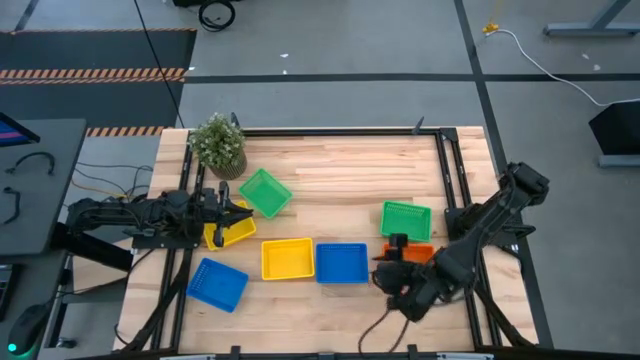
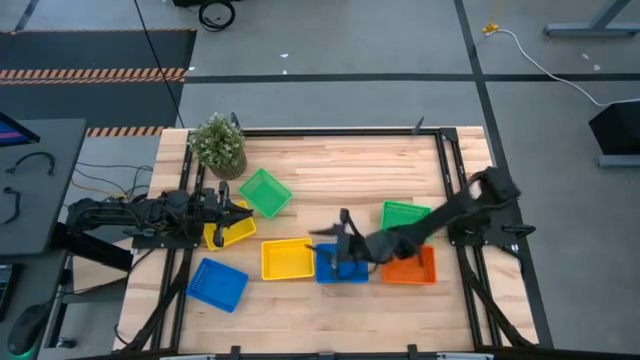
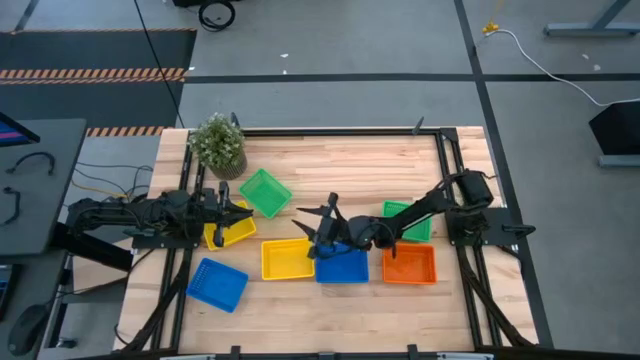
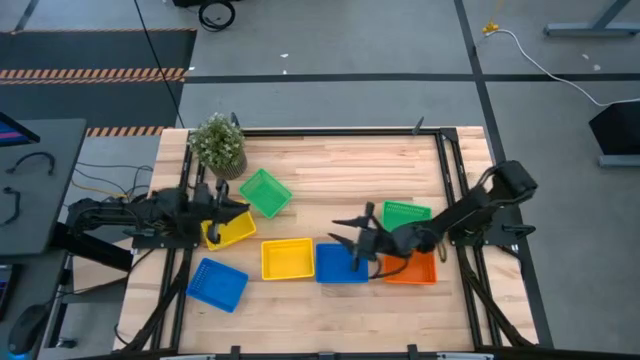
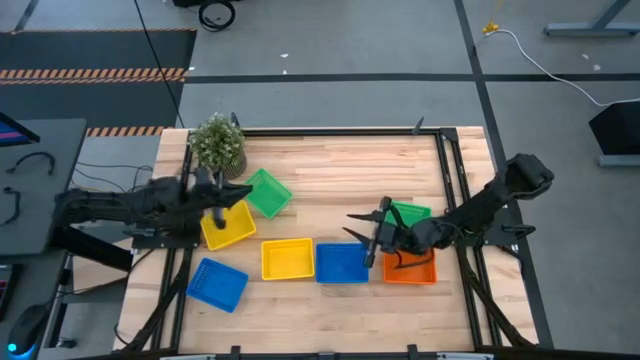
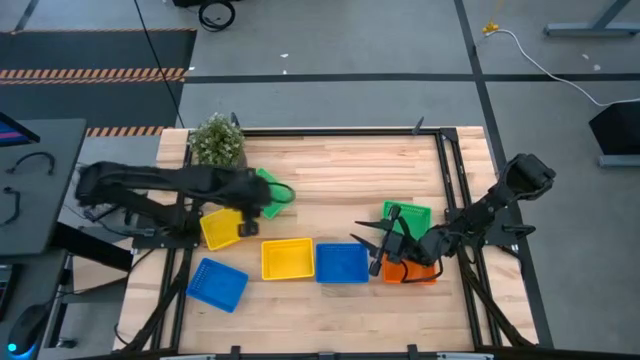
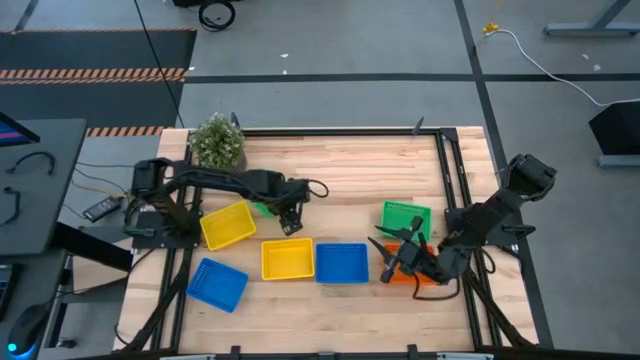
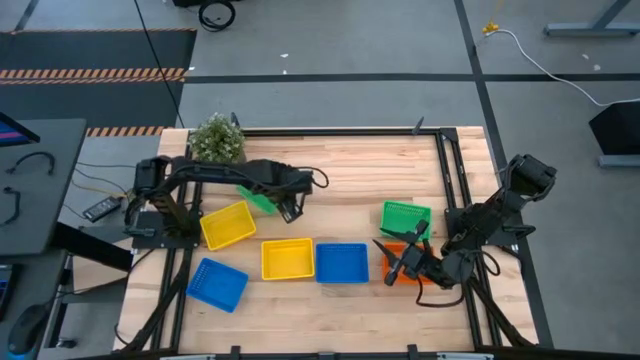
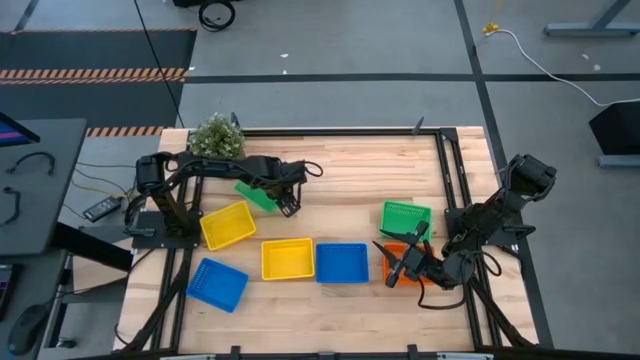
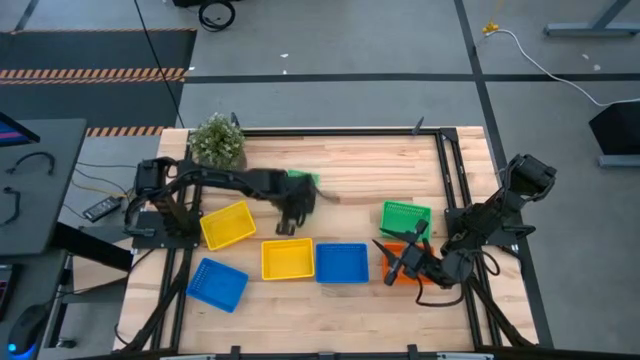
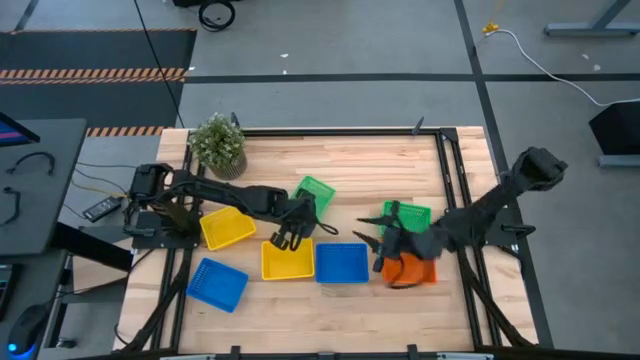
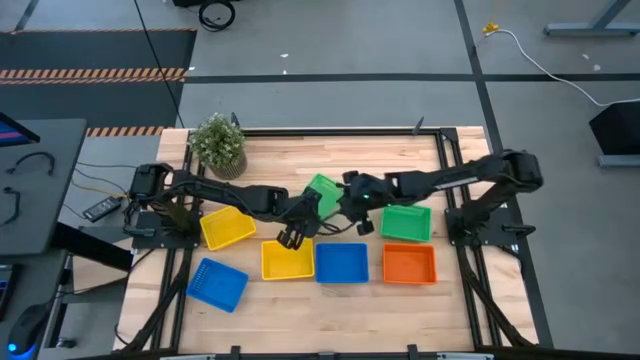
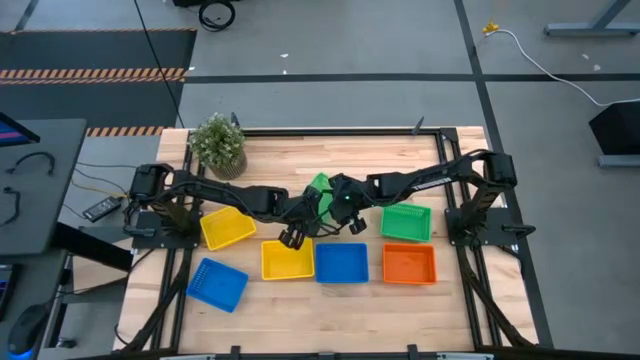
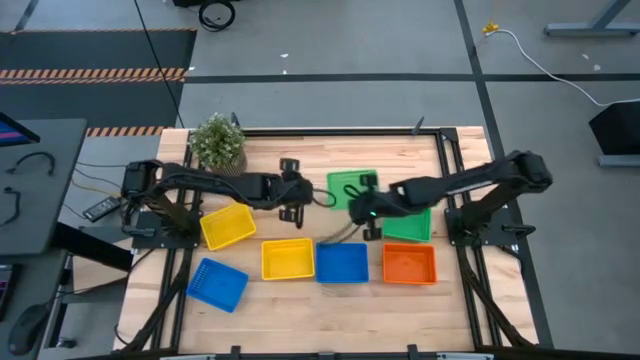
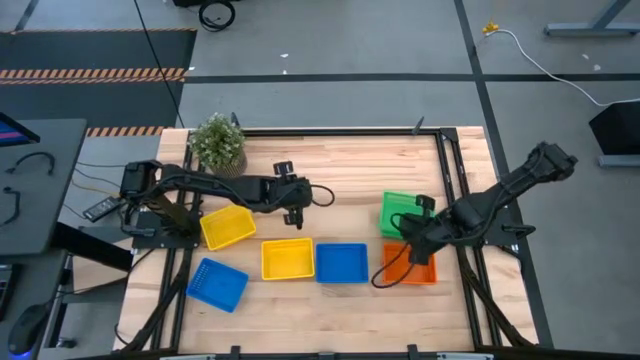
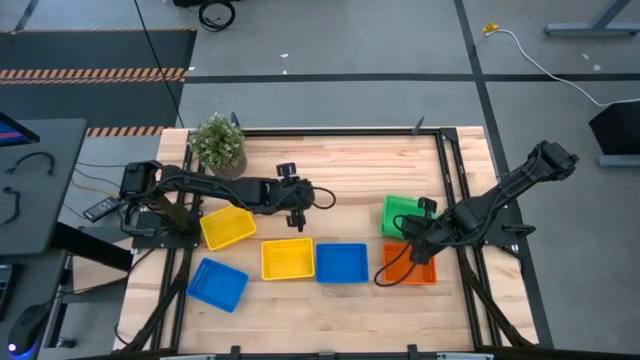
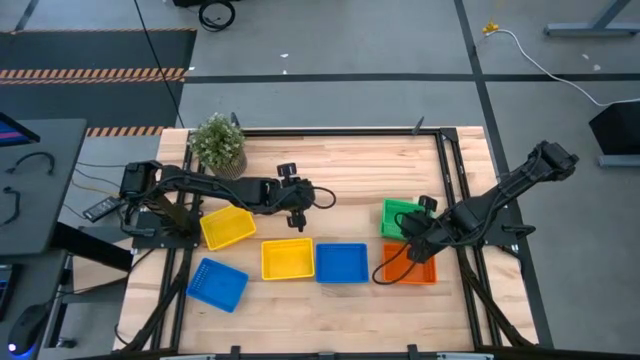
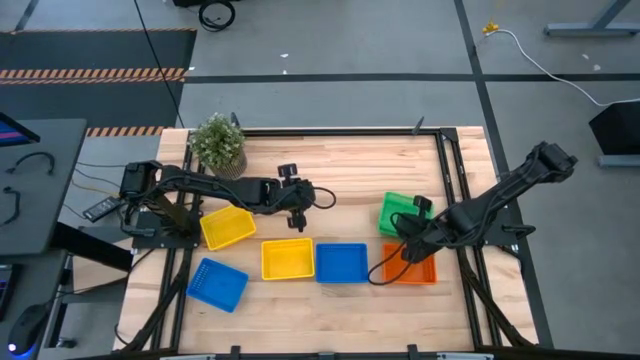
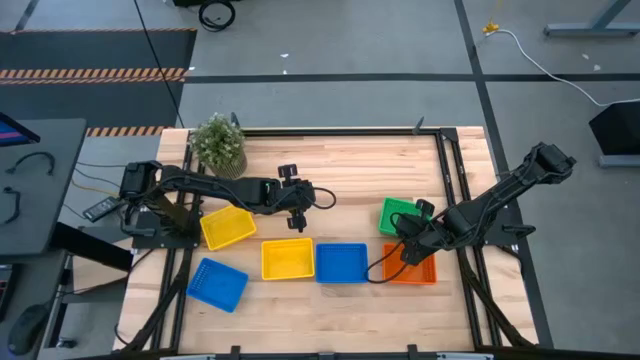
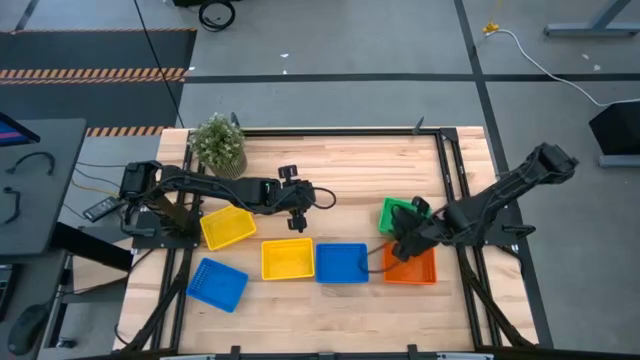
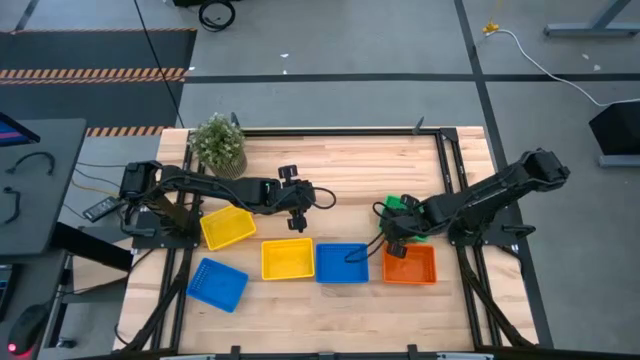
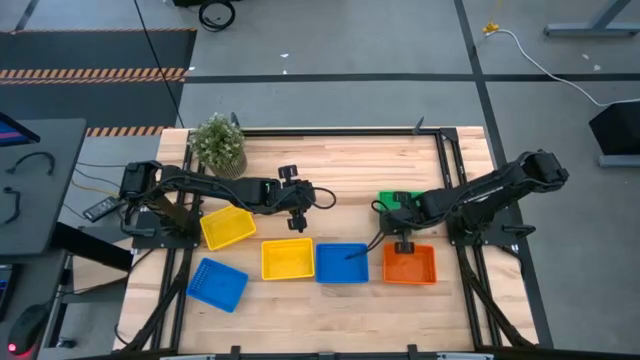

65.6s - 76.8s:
Stack the left green bin on top of the right green bins

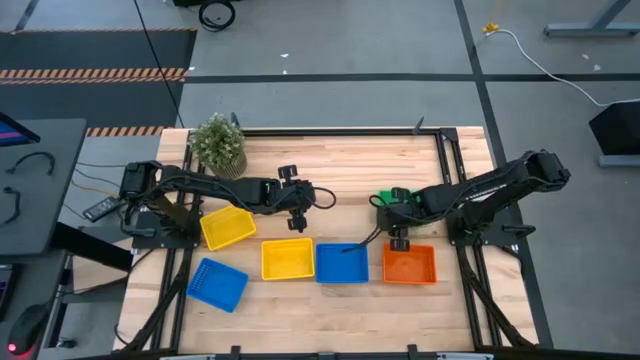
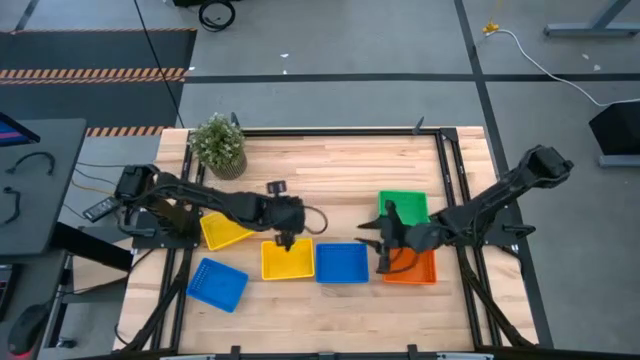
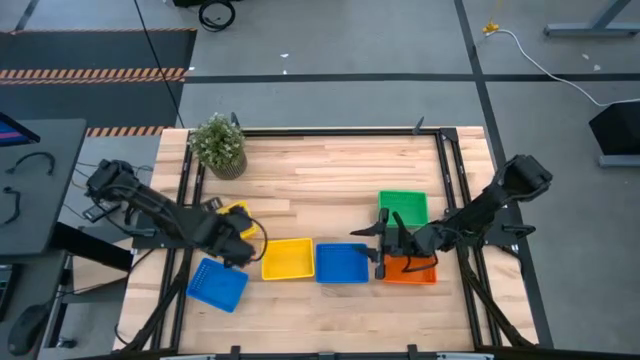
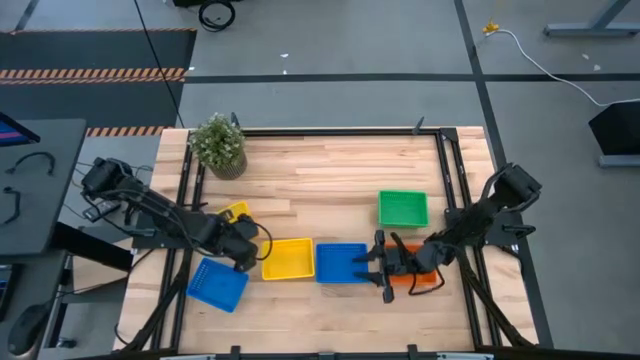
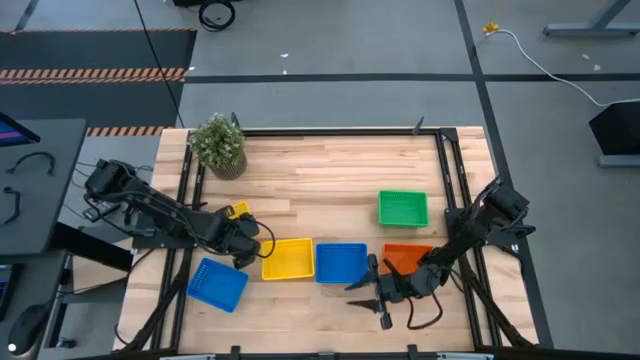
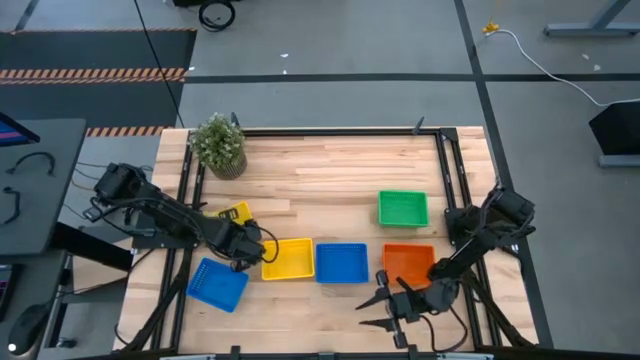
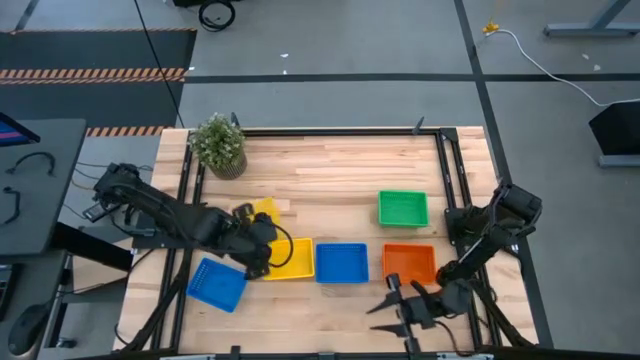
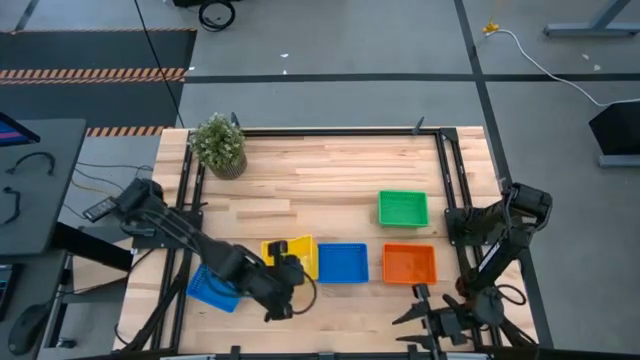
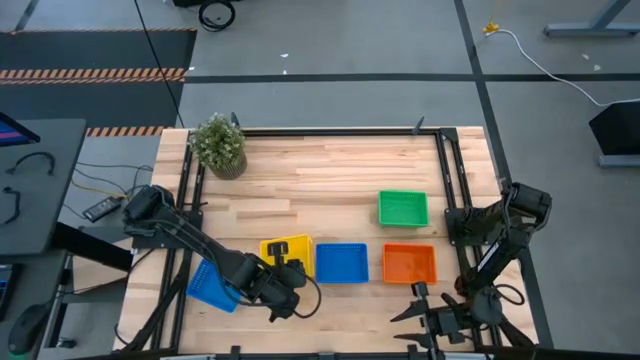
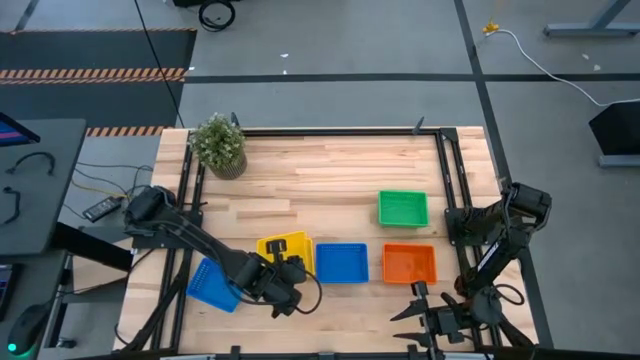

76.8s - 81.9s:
Stack the left yellow bin on top of the right yellow bin

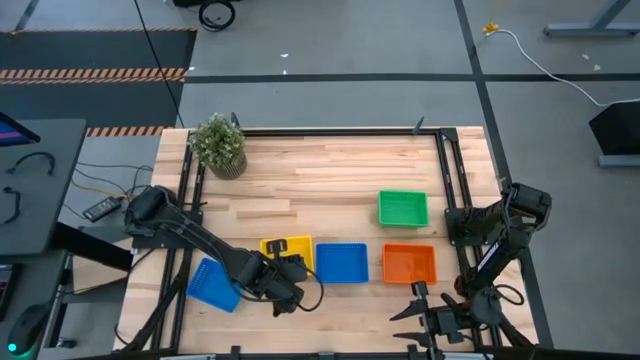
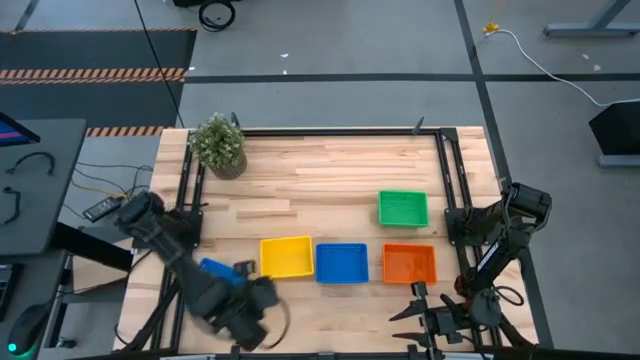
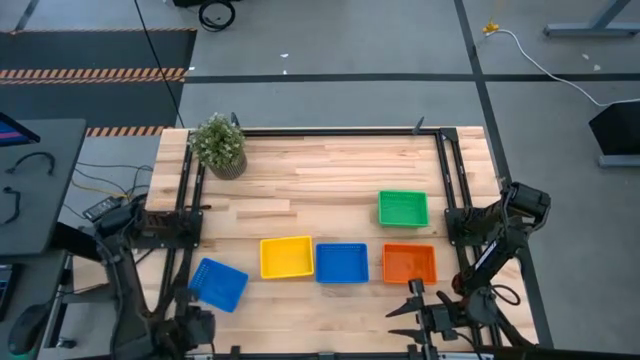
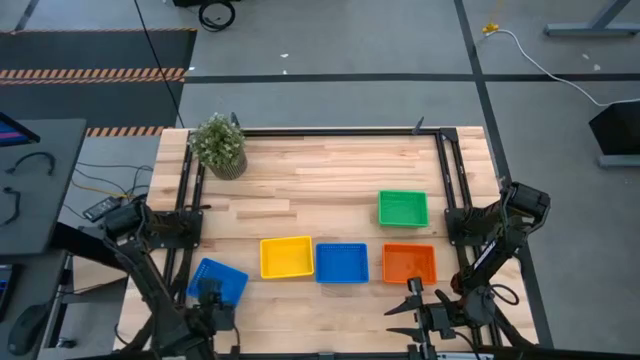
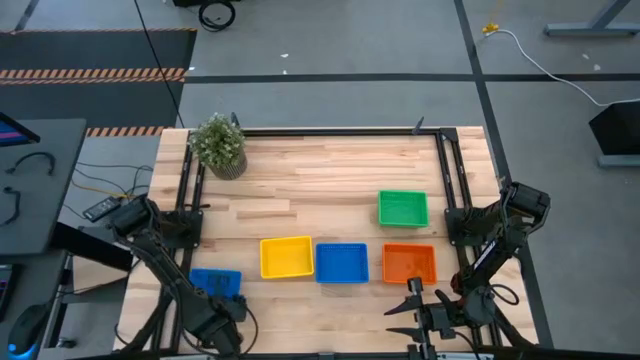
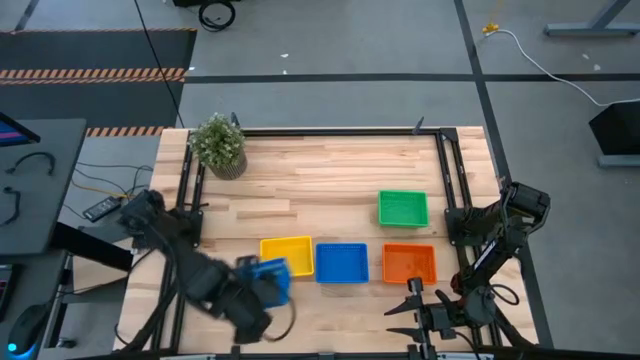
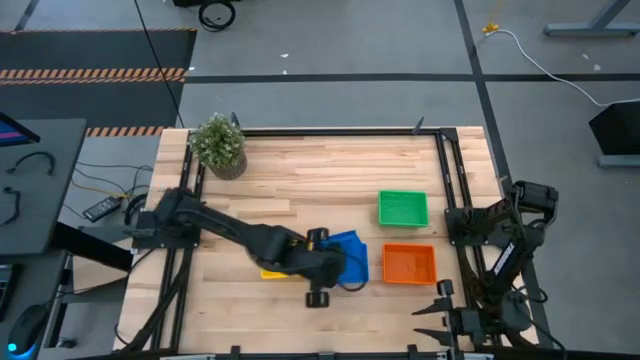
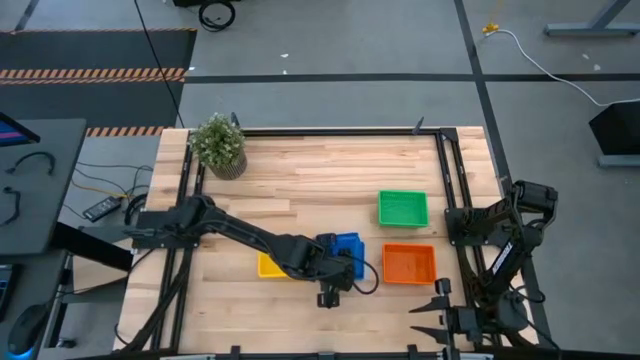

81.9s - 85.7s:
Stack the left blue bin on top of the right blue bin

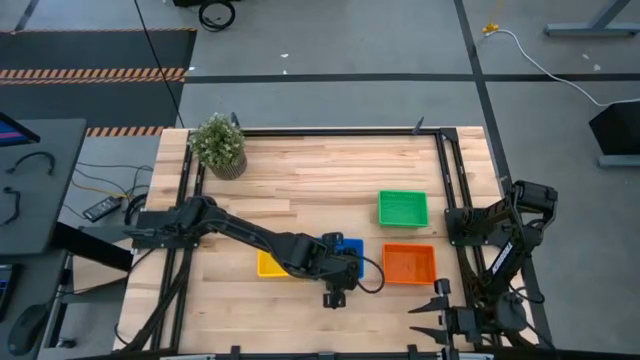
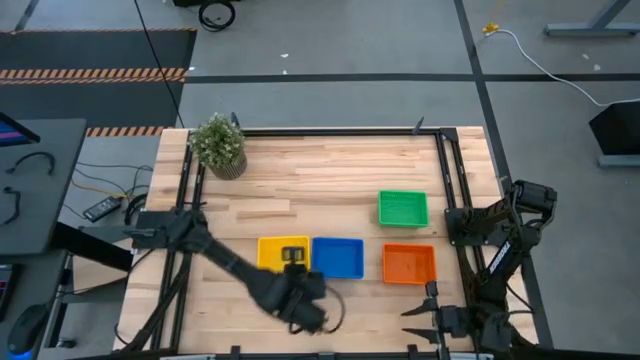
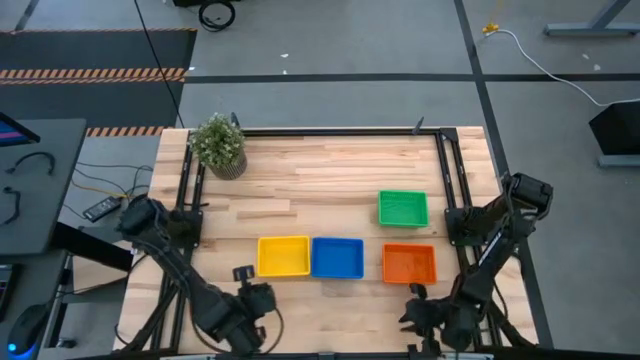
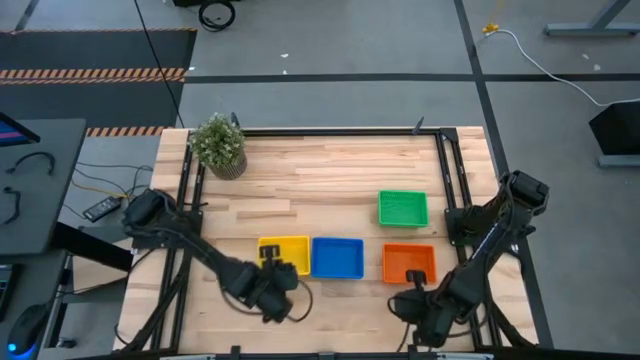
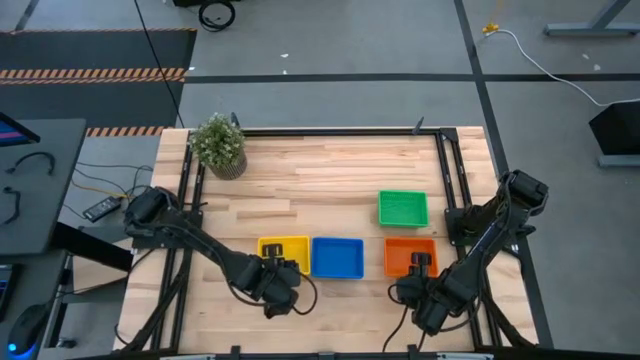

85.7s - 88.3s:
Adjust the stacked orange bins
